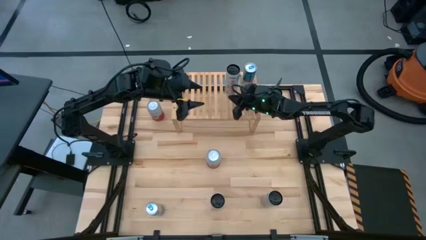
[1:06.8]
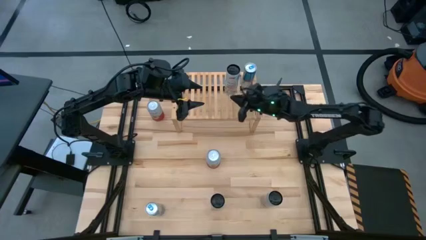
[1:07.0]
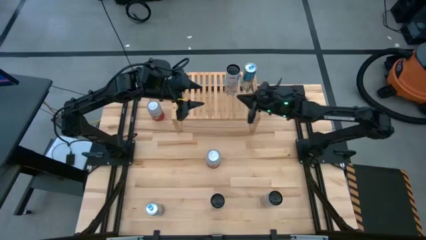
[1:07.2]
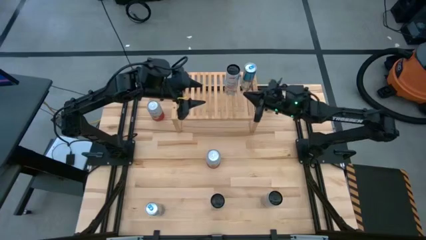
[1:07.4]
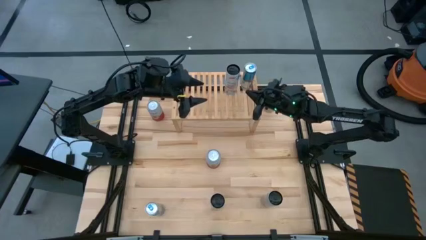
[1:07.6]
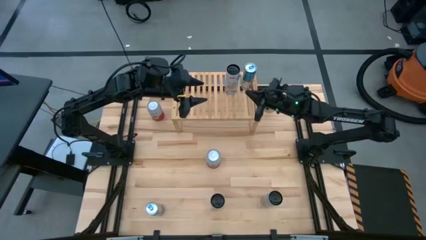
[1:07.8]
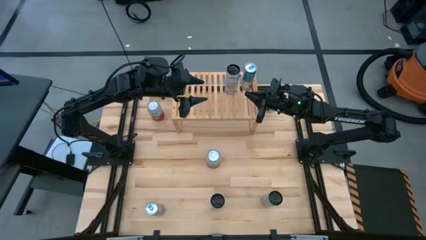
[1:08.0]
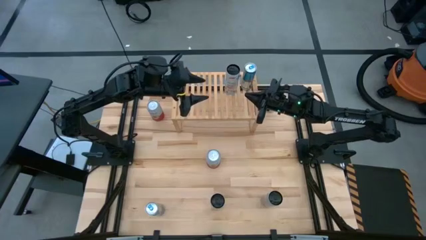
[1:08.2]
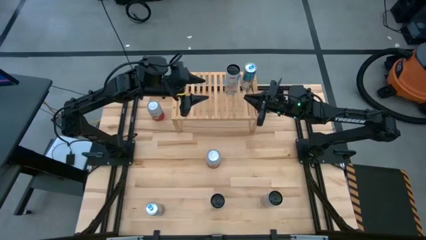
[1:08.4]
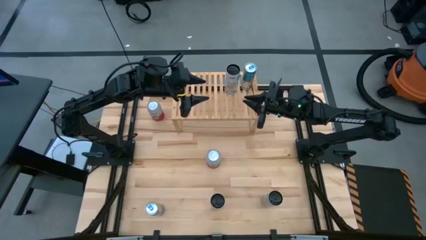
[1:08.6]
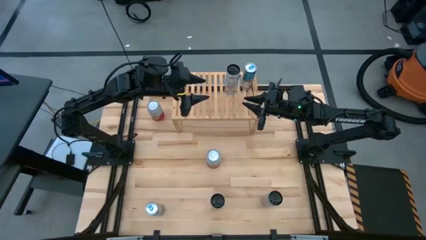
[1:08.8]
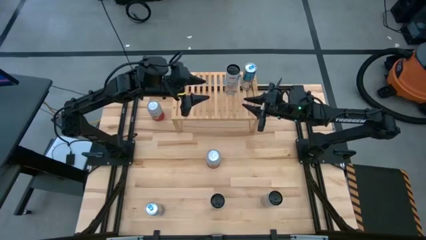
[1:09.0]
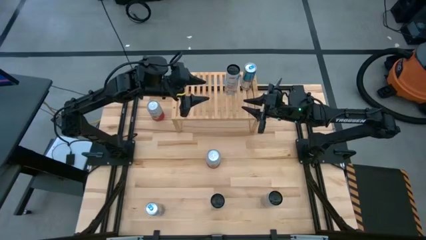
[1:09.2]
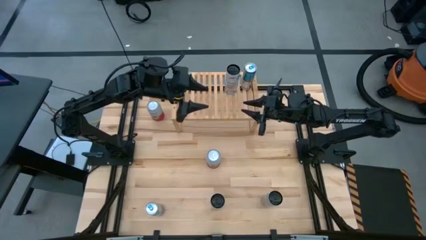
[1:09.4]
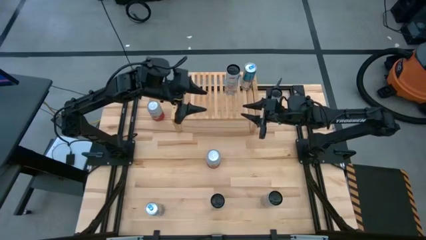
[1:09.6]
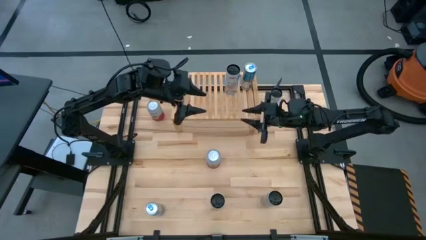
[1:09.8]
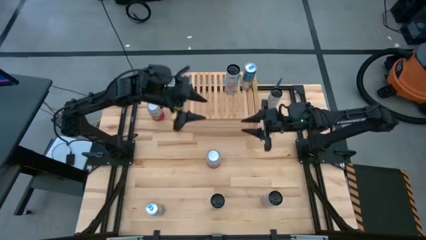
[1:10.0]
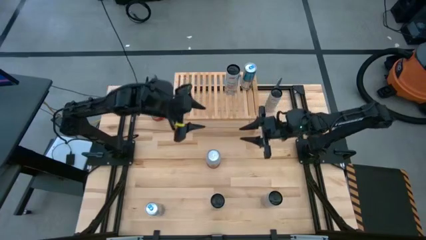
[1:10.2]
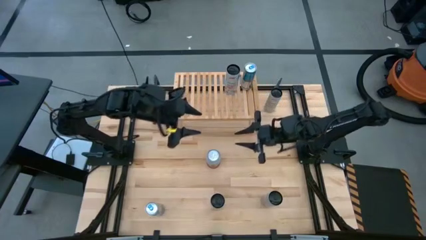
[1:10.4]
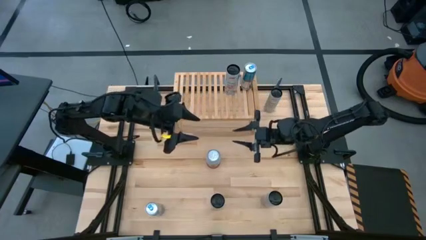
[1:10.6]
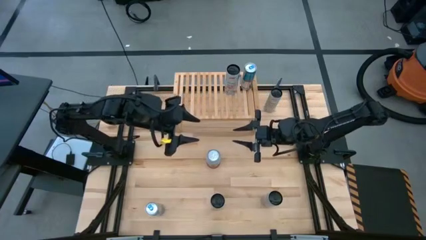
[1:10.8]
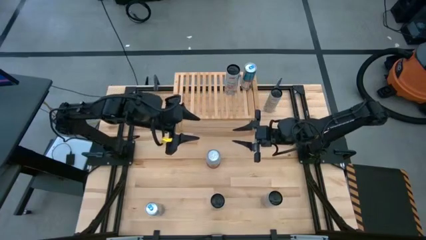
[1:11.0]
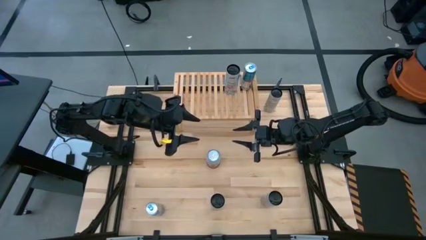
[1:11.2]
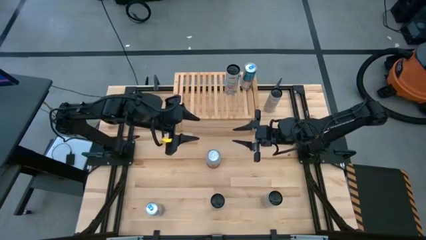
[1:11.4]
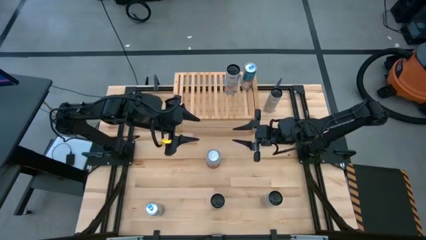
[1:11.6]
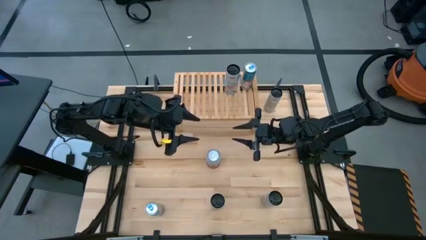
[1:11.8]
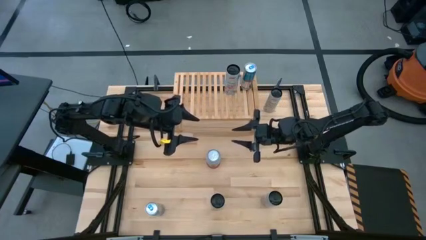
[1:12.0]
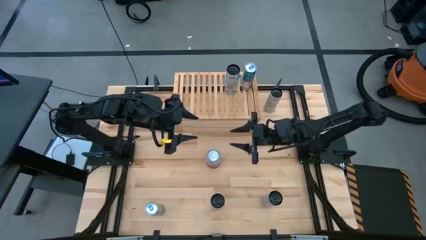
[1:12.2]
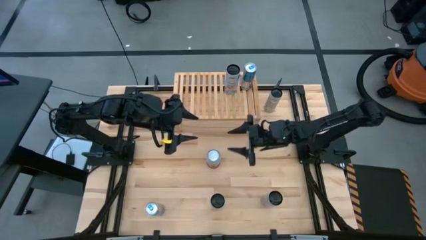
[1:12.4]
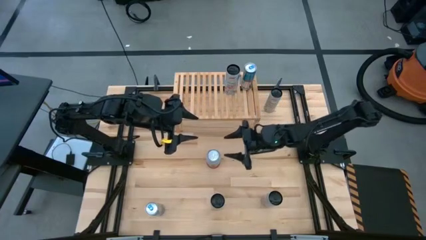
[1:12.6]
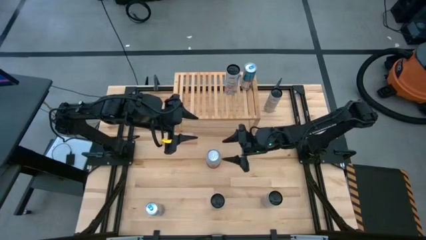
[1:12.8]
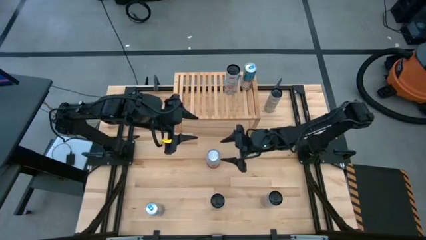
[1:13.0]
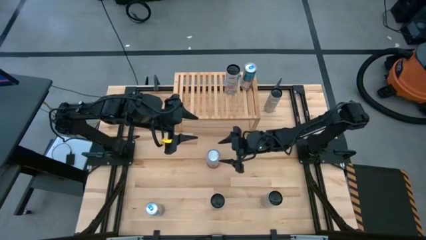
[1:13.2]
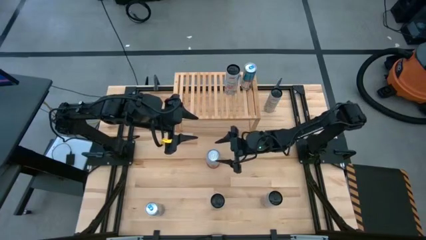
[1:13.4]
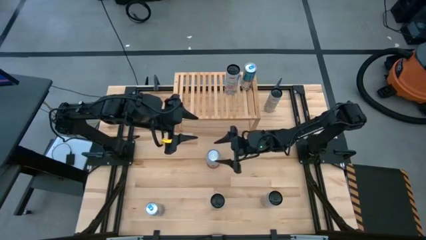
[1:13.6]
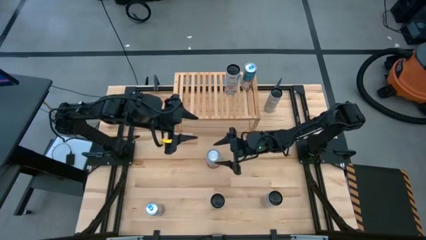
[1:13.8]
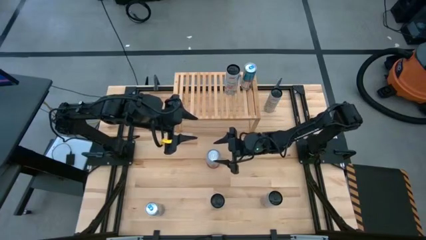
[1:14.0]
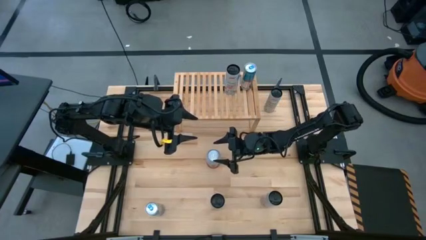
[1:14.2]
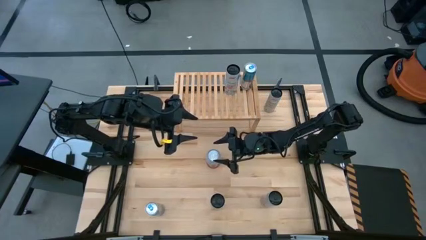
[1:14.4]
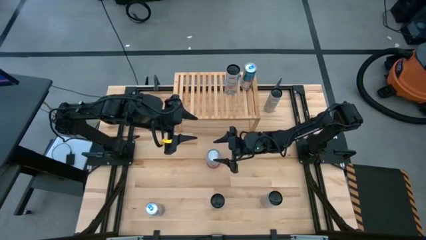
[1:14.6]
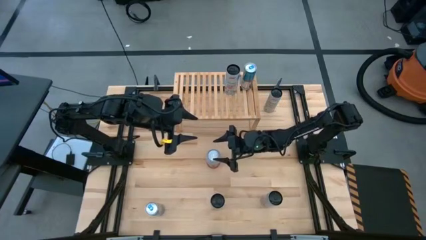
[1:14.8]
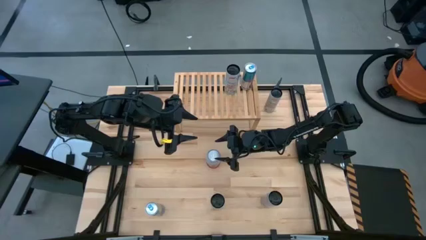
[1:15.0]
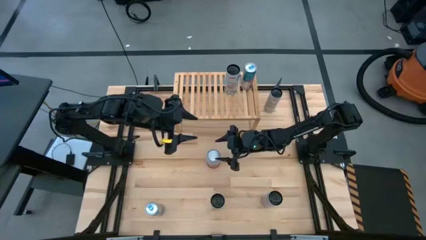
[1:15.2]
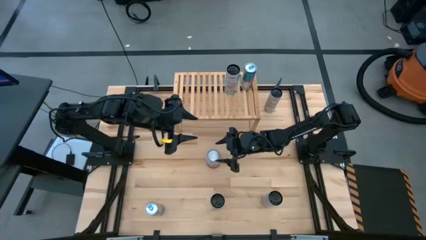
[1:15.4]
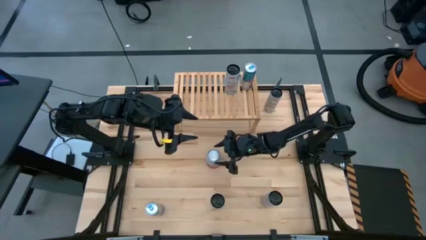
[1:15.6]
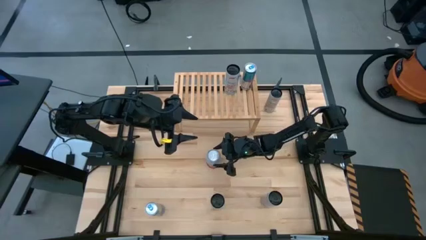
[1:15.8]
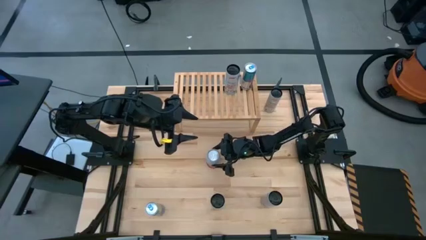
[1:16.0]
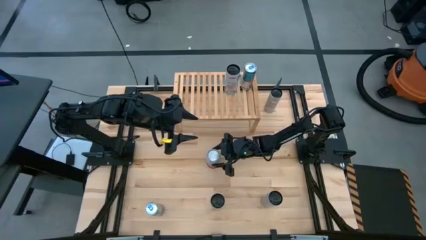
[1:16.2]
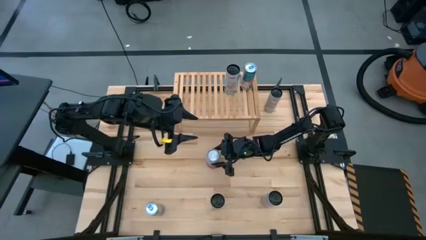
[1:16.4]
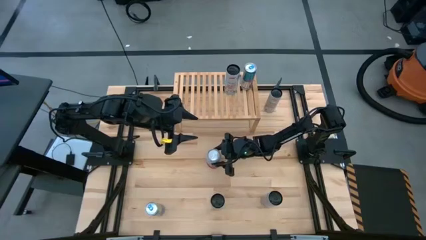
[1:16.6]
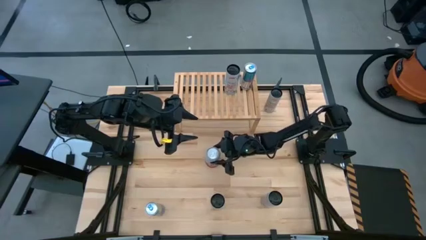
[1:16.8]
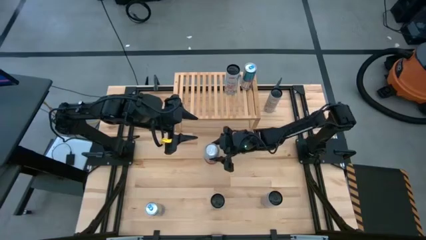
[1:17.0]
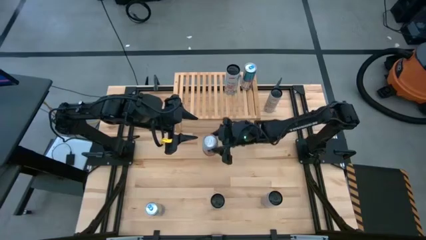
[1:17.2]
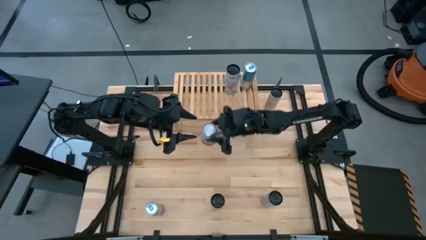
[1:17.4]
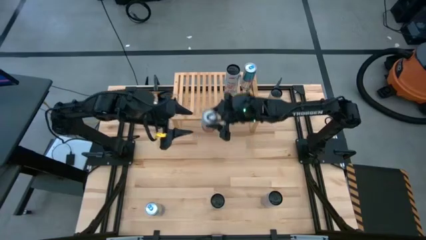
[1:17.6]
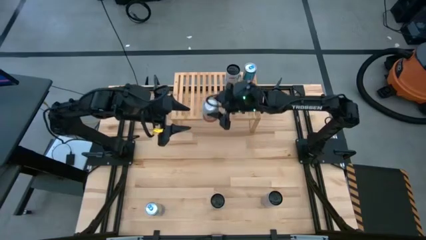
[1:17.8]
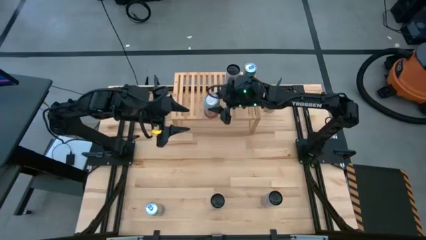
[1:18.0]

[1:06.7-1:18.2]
Task: Place canned beverage on shelf
Put the bottom pink white soda can on the shelf
